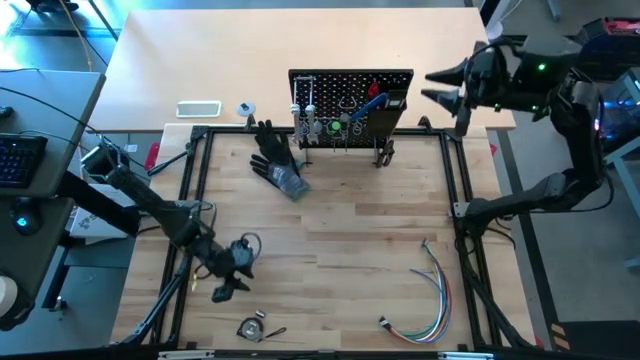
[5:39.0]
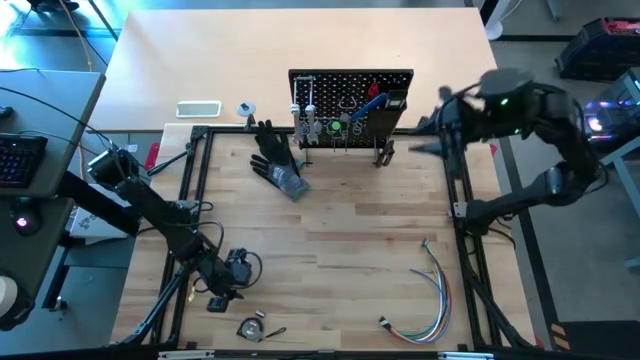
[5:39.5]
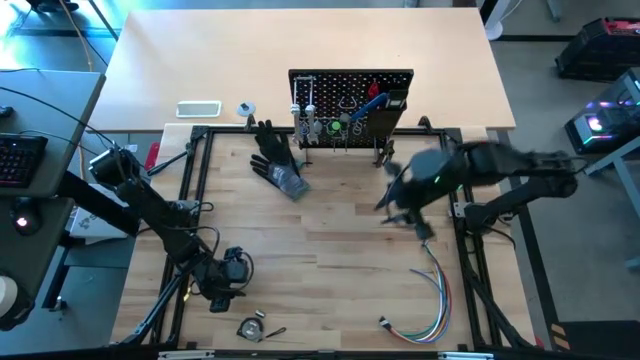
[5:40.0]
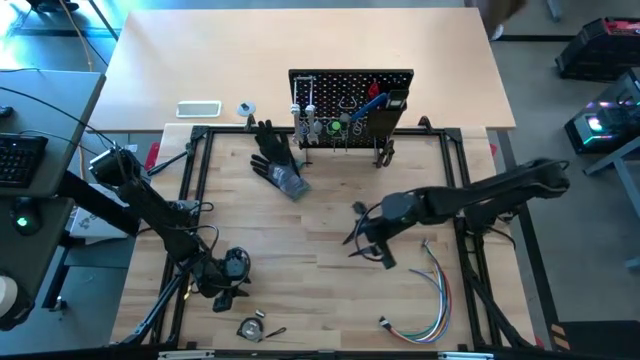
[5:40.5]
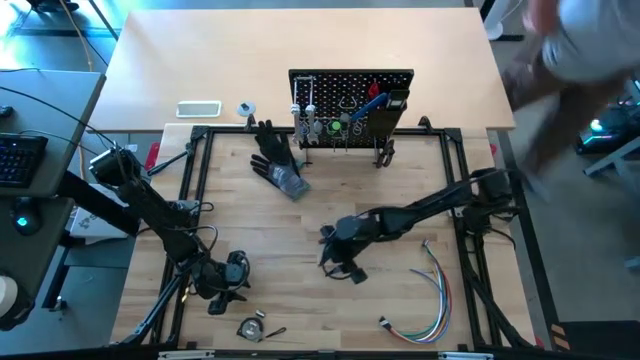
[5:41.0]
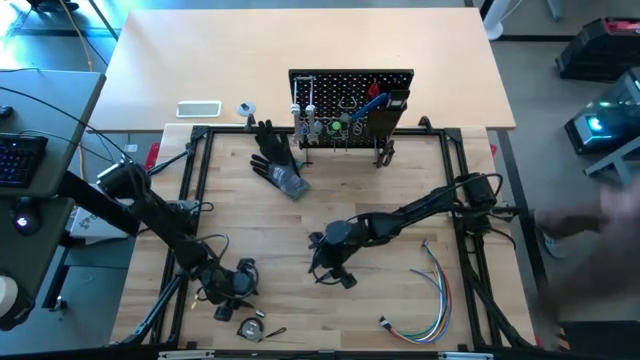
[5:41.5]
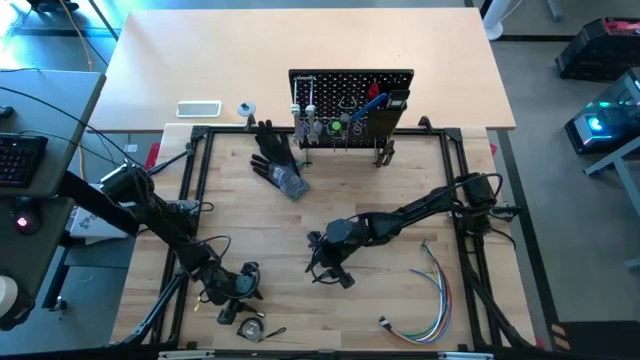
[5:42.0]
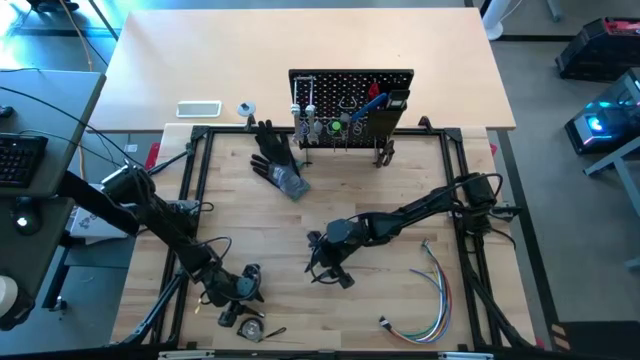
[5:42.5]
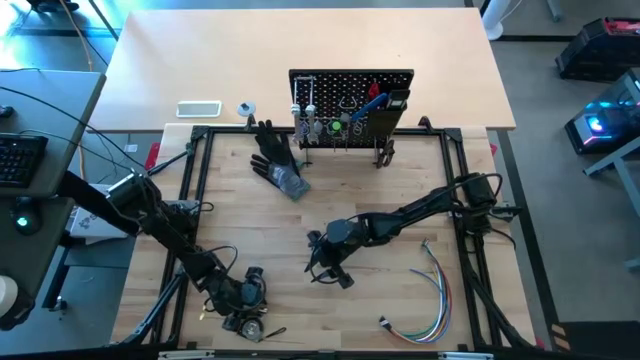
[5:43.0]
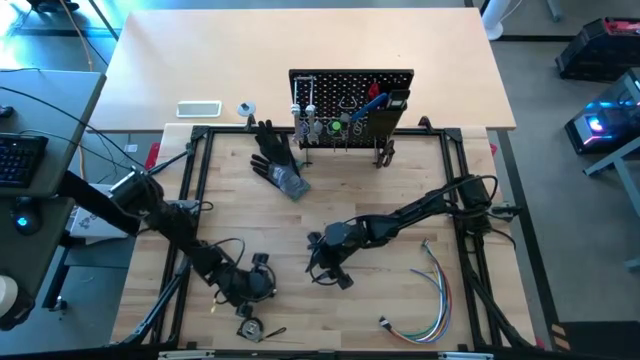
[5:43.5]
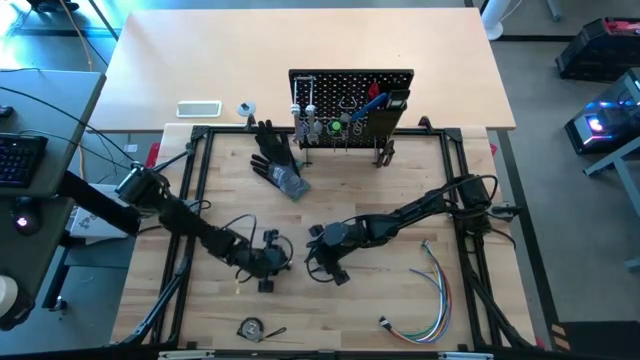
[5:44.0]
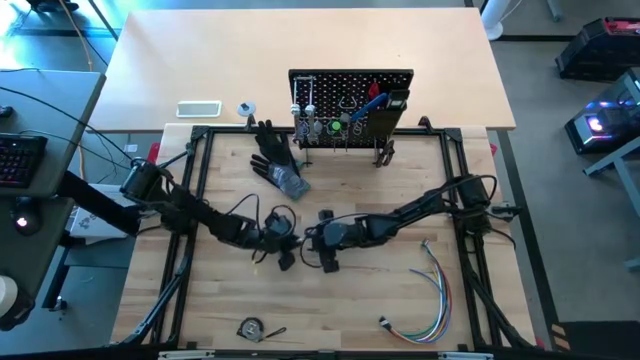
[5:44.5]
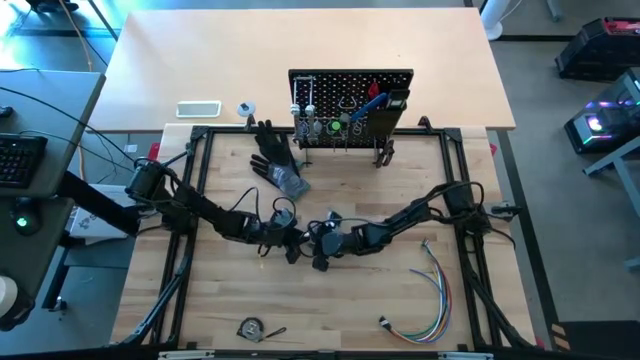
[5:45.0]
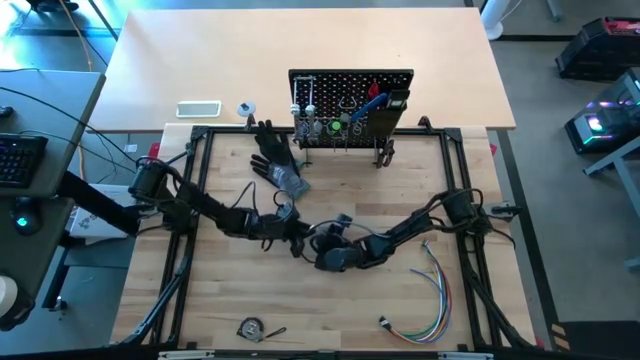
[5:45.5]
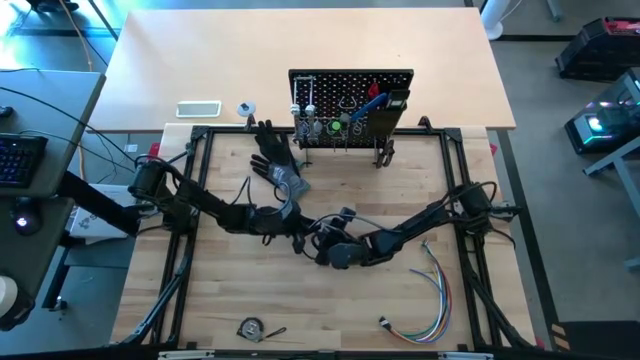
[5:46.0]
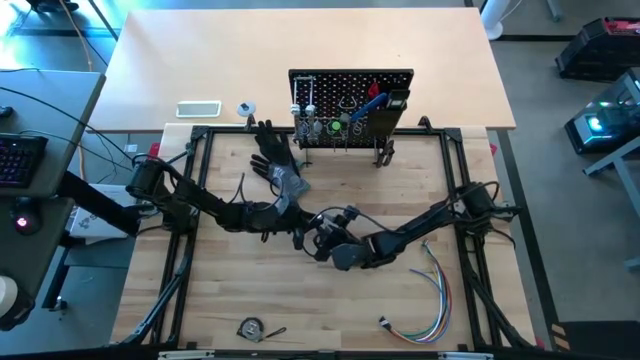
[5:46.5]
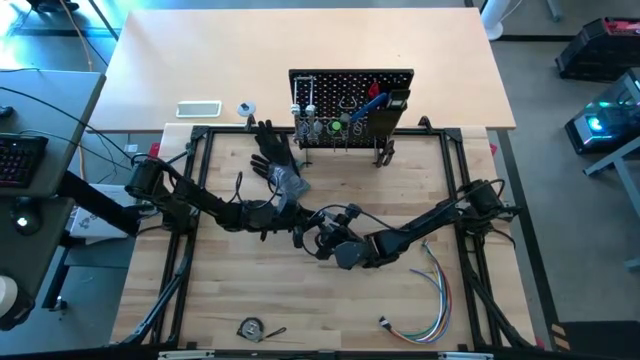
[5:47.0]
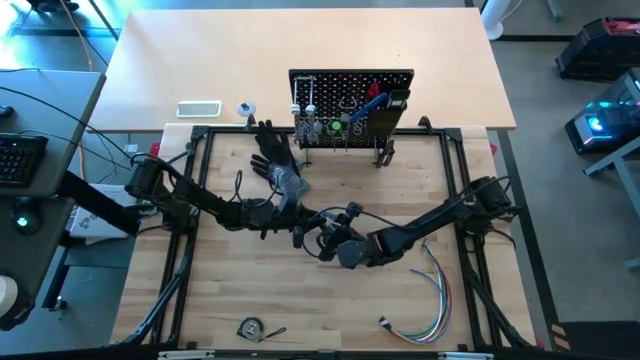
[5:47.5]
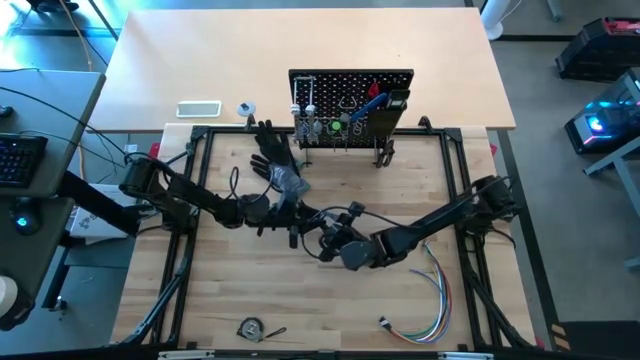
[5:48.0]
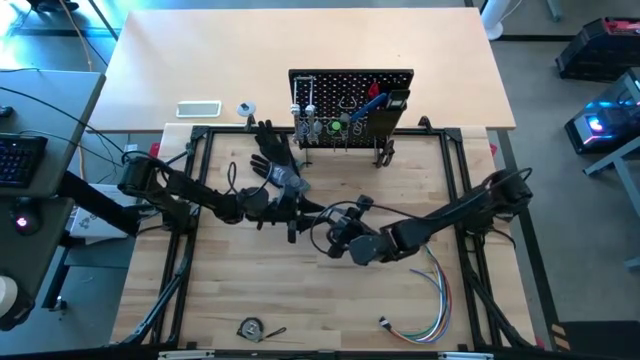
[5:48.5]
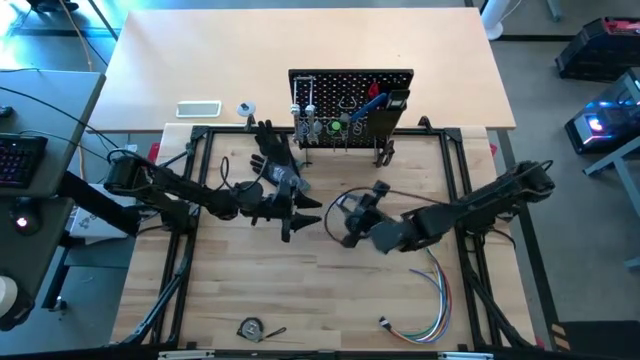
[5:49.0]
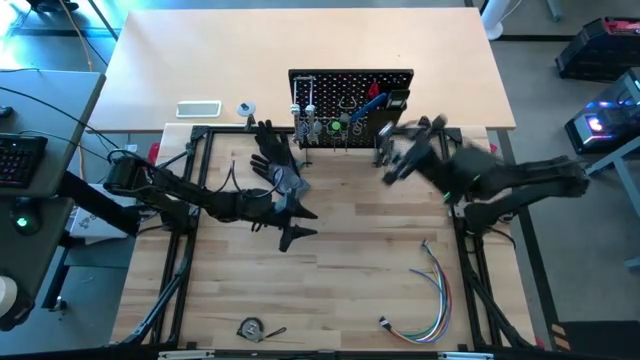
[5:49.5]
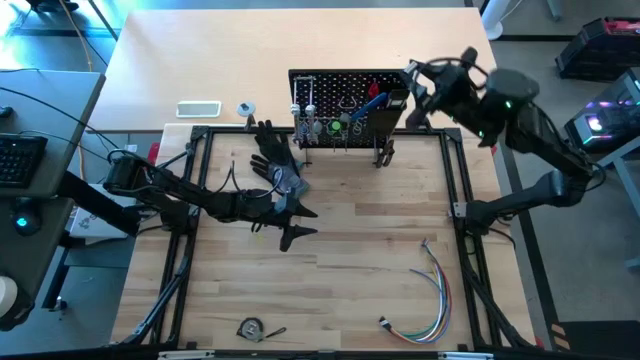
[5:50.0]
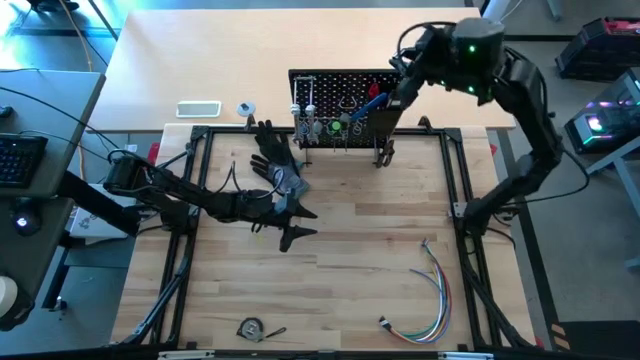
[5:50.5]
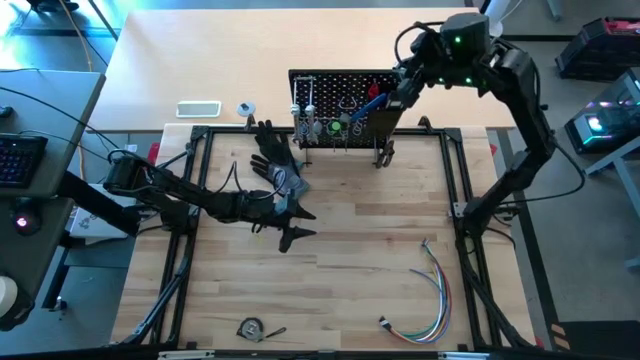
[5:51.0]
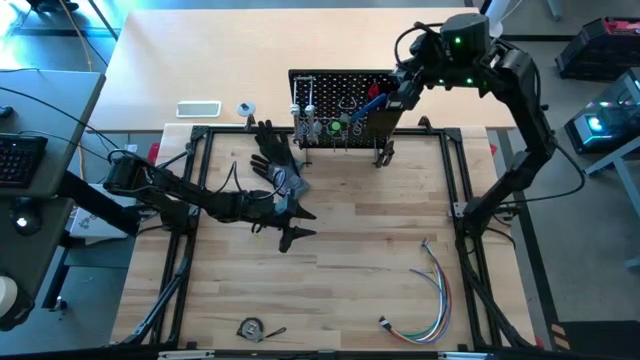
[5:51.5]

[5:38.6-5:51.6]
Task: Hang tools onto peg board
Put the silver socket into the black bin on the pegboard
